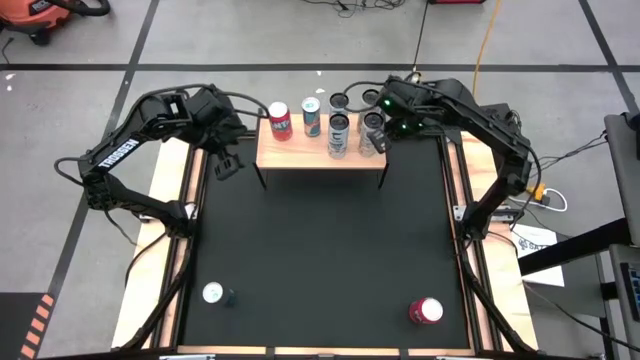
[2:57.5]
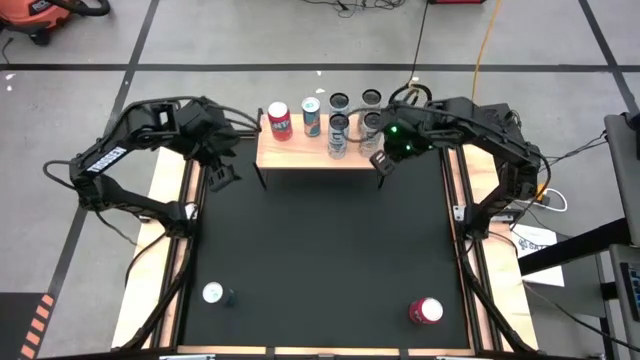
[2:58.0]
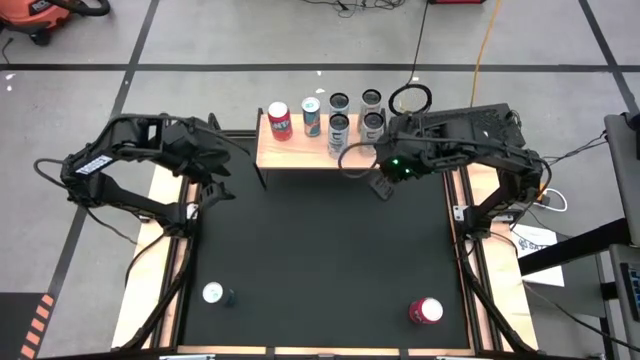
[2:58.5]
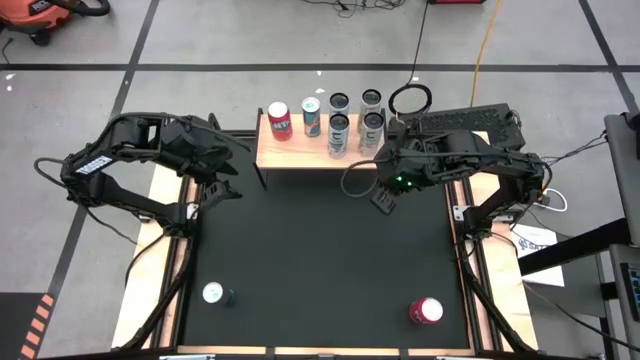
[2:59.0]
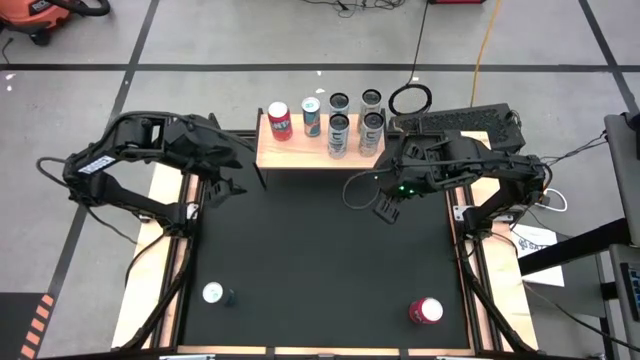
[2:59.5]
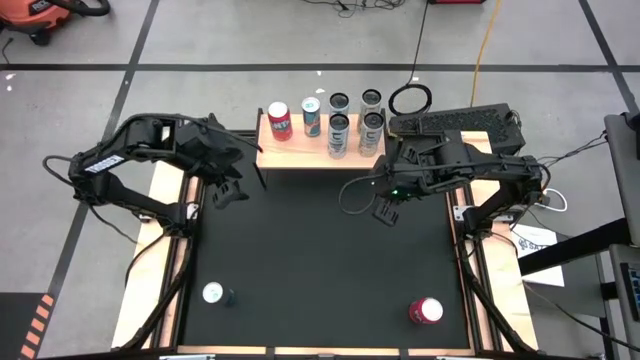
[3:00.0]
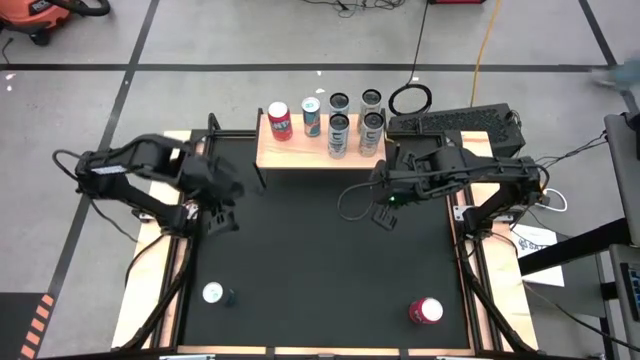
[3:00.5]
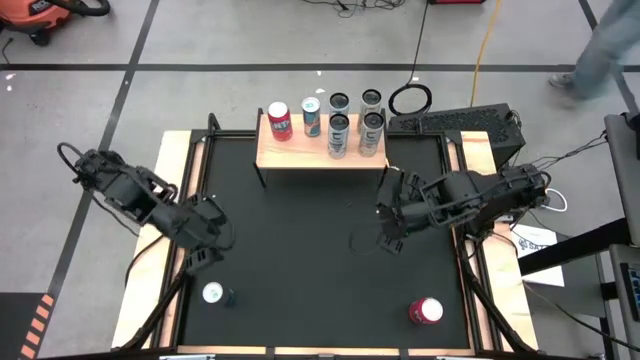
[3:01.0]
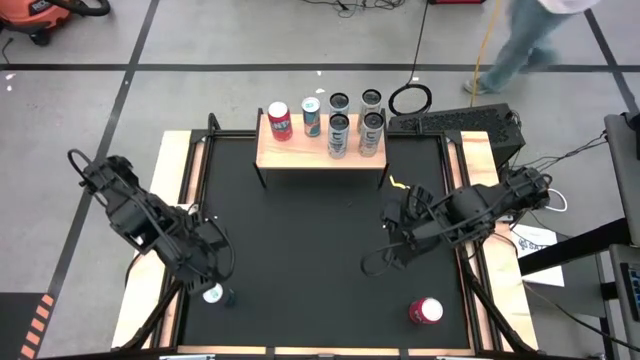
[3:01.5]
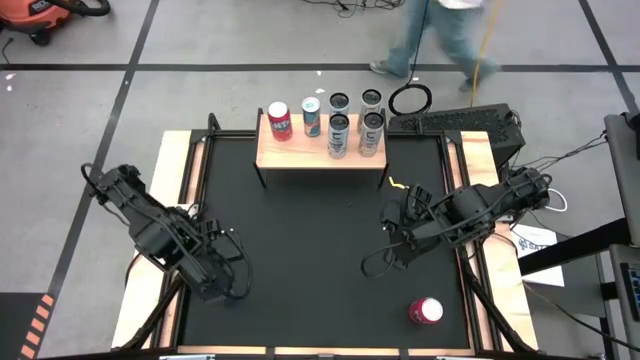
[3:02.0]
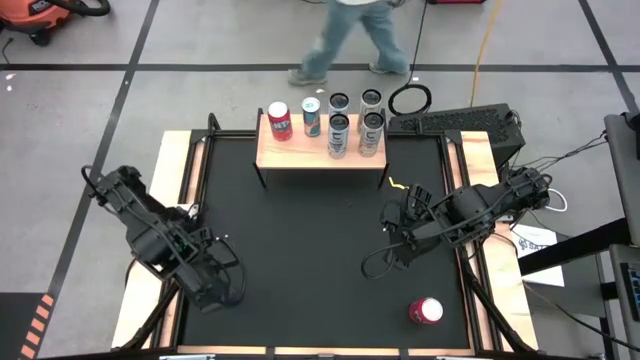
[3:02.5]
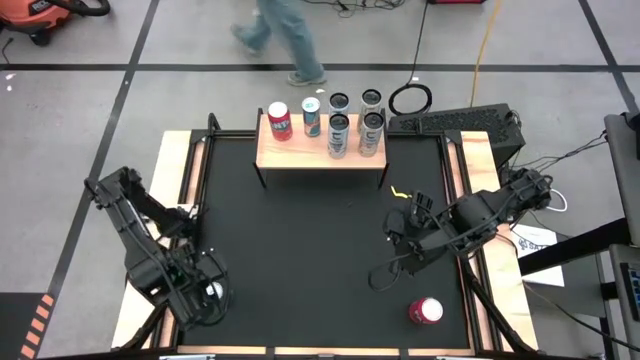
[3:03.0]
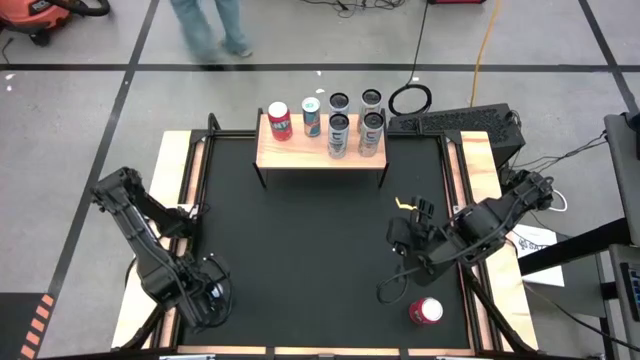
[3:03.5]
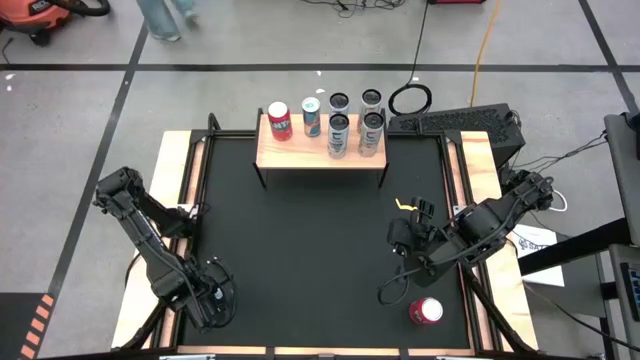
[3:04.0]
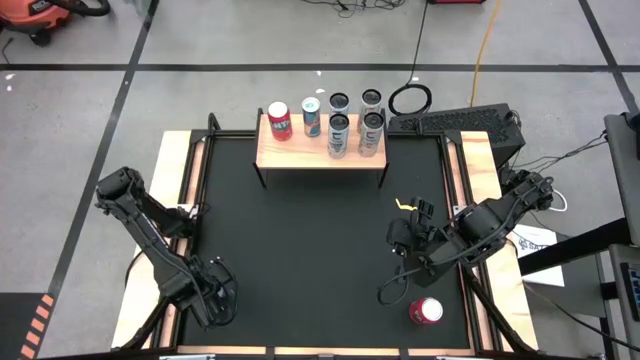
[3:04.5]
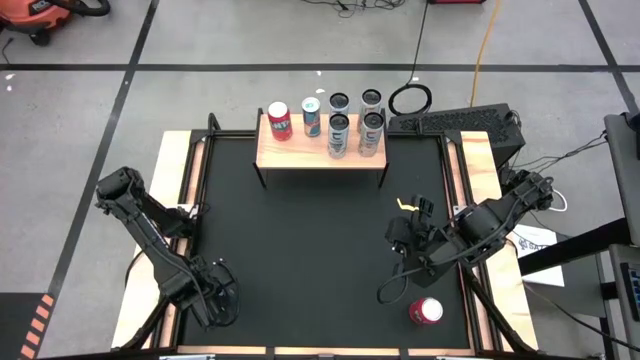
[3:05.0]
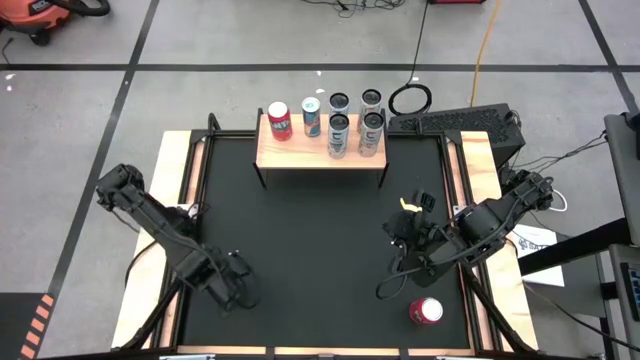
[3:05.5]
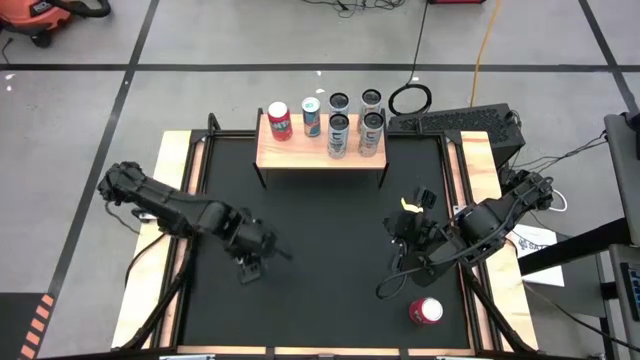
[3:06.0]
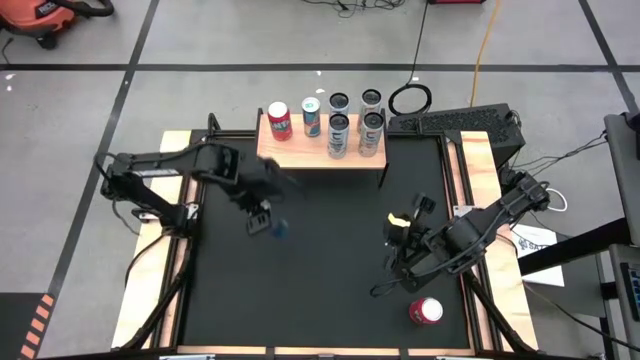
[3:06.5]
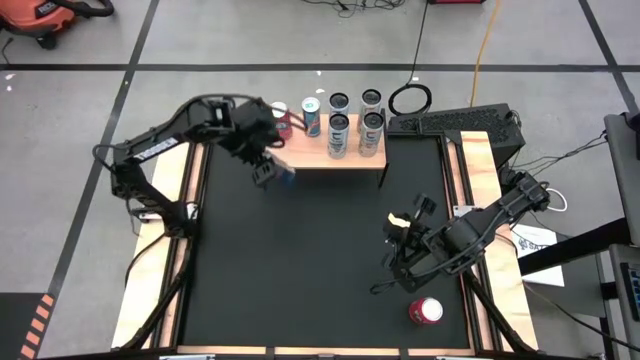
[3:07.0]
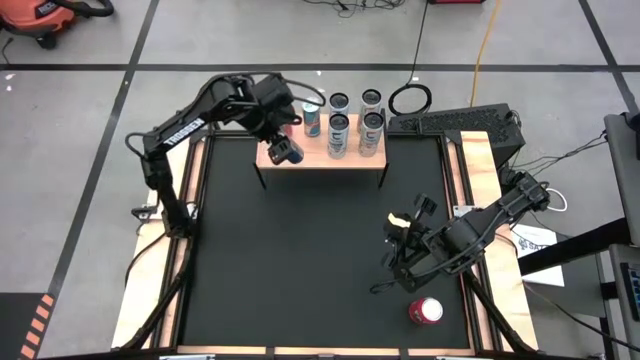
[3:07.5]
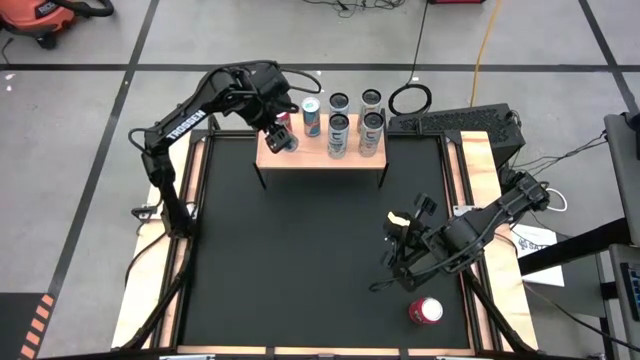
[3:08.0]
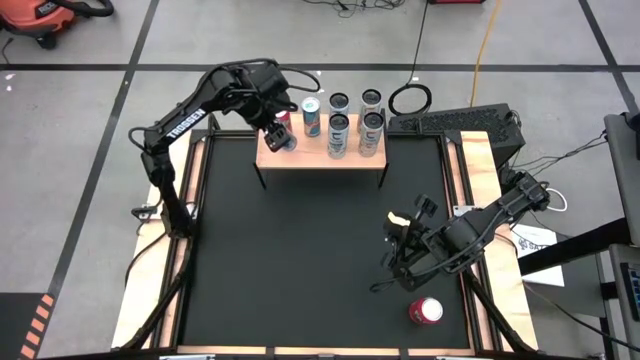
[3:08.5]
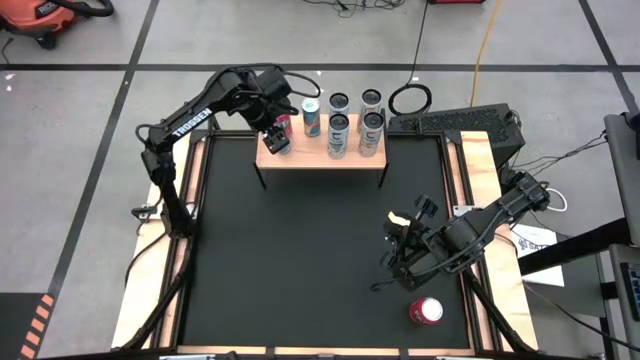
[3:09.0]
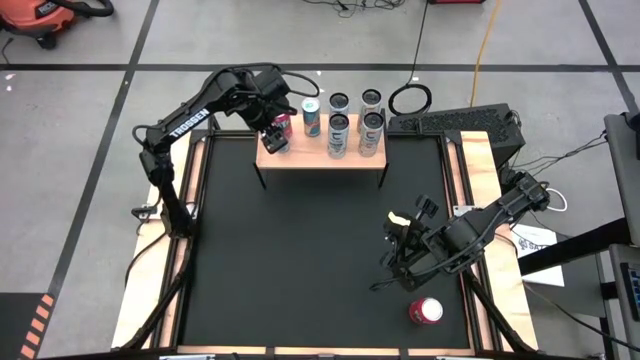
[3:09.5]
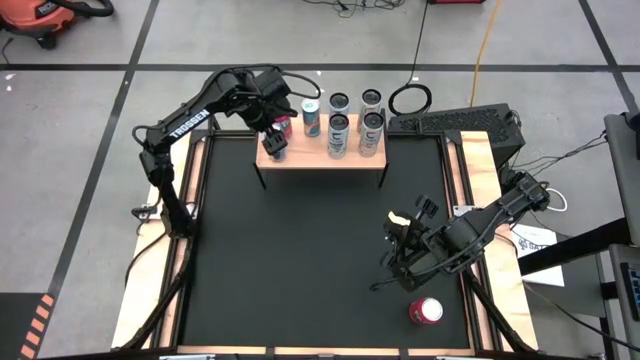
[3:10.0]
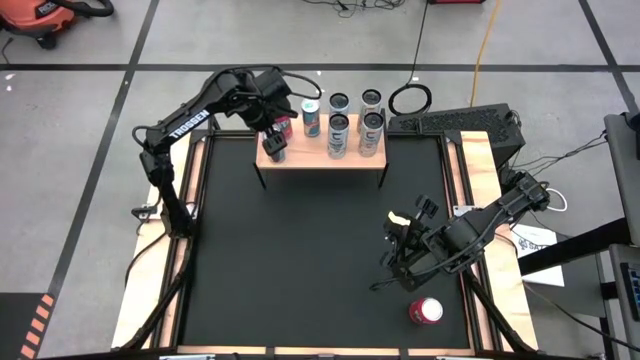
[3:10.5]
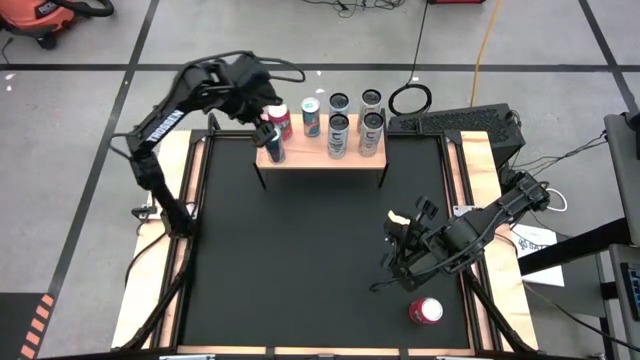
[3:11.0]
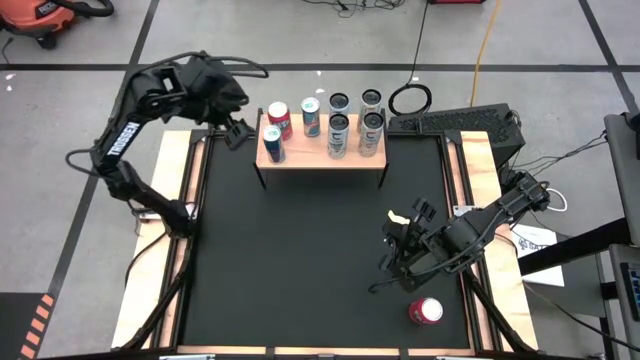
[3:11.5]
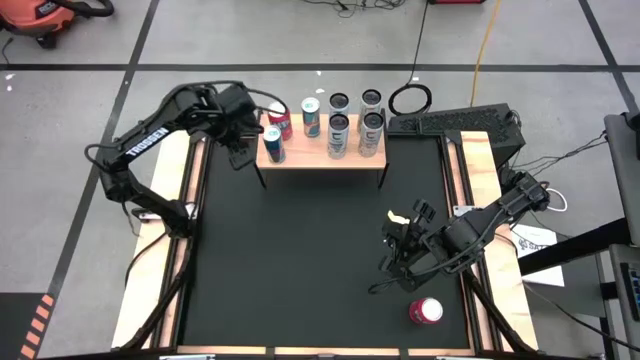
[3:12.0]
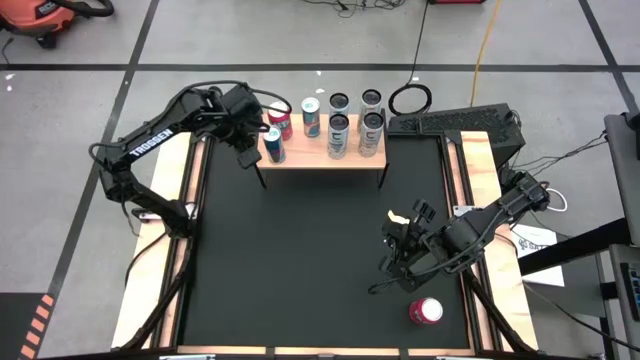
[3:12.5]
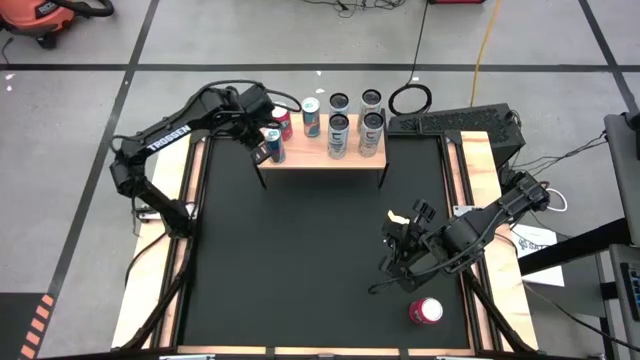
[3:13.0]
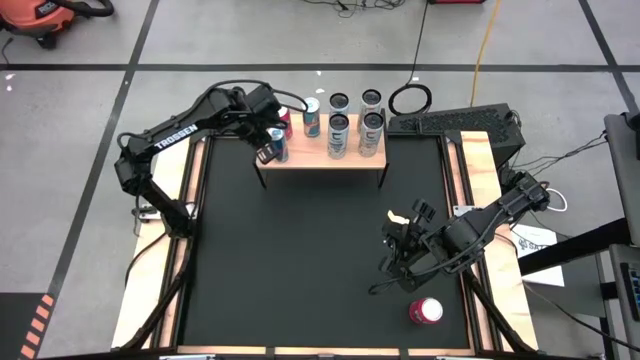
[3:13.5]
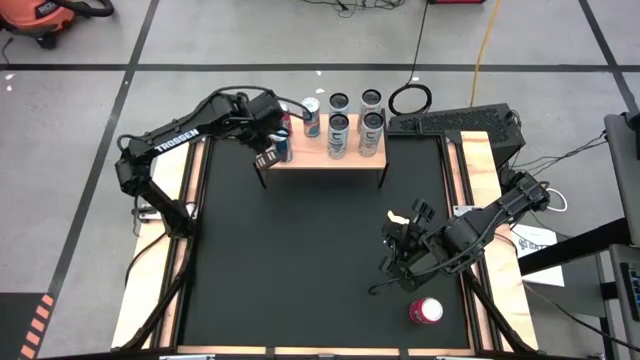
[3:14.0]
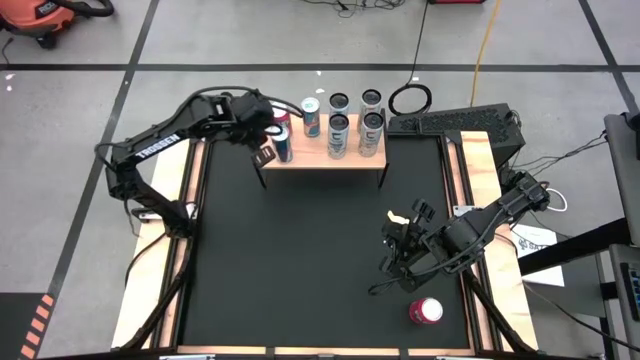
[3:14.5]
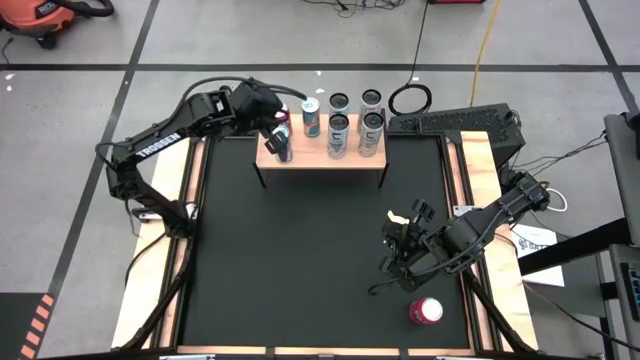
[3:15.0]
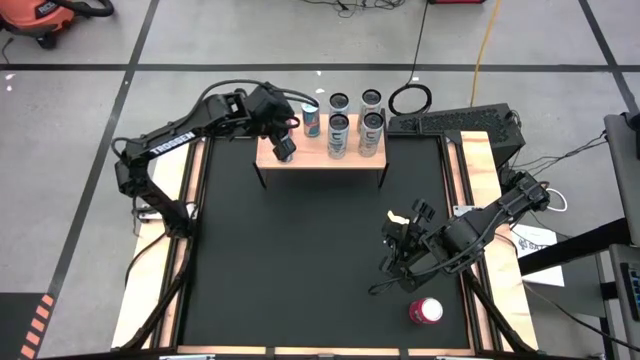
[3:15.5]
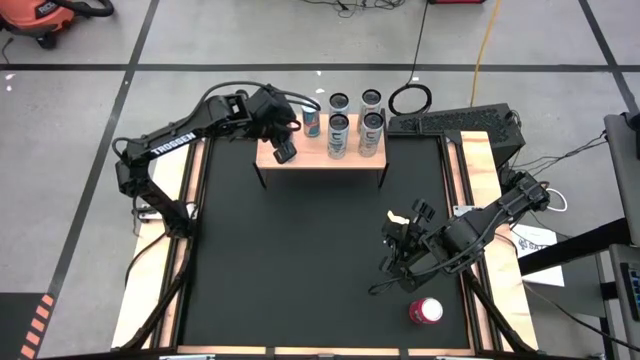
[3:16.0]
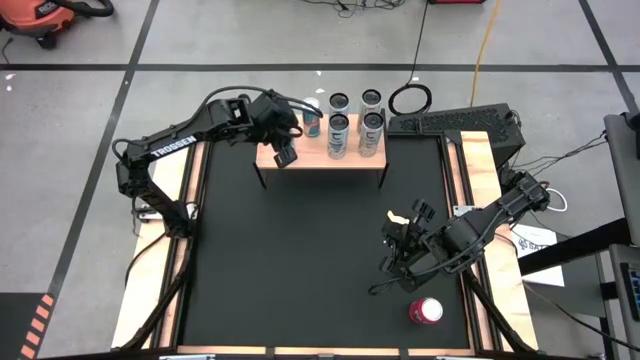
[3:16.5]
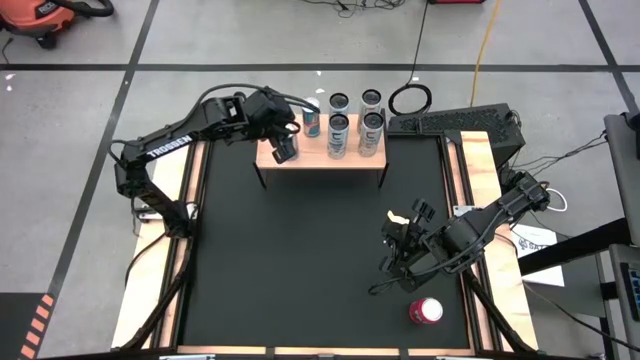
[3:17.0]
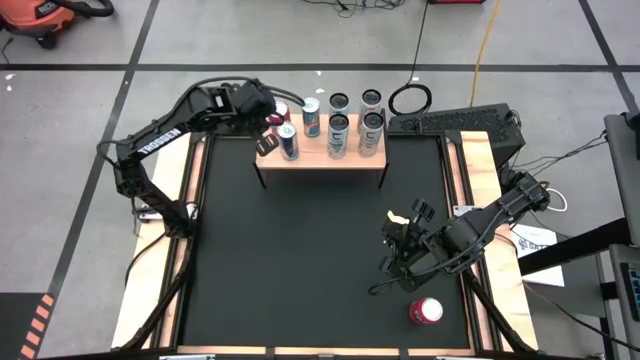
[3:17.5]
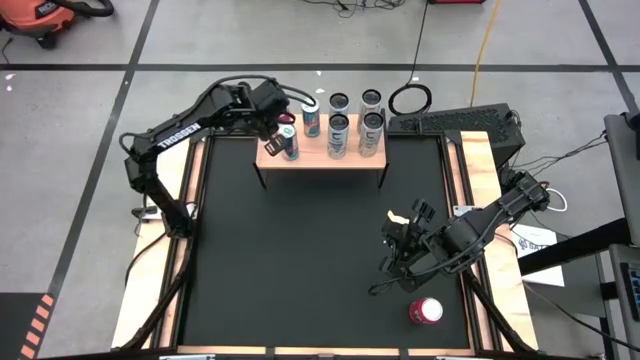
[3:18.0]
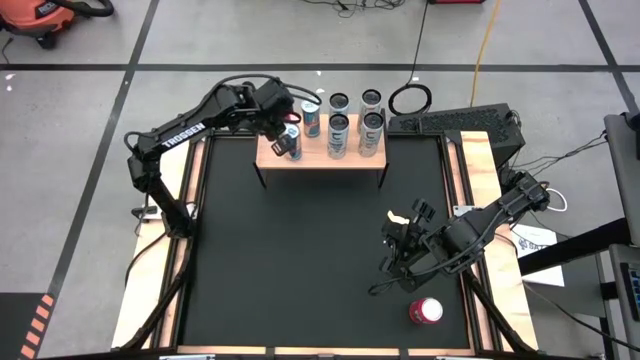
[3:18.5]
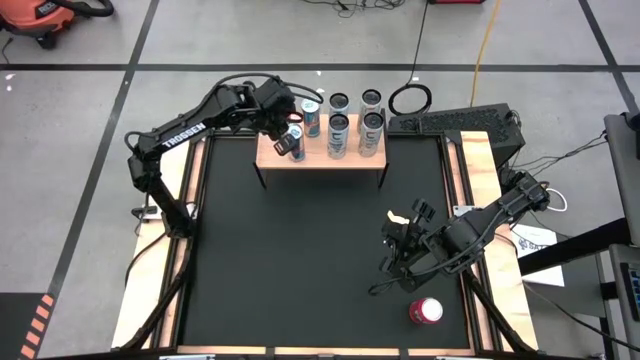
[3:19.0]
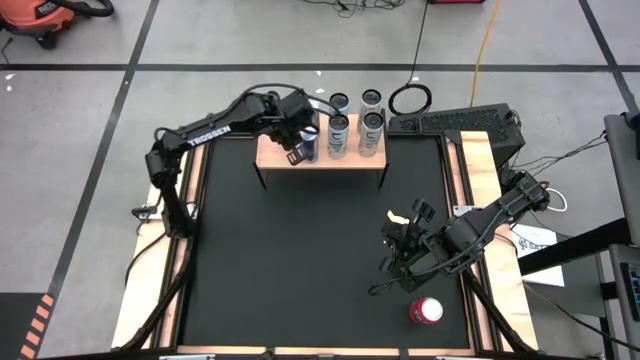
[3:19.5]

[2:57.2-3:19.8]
Task: Place canned beverage on shelf
Put the blue soda can on the shelf aligned with the other blue soda can
